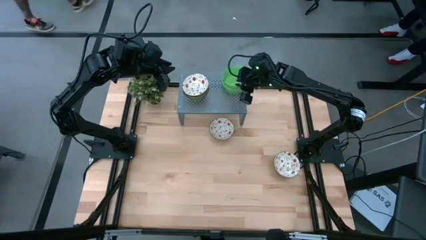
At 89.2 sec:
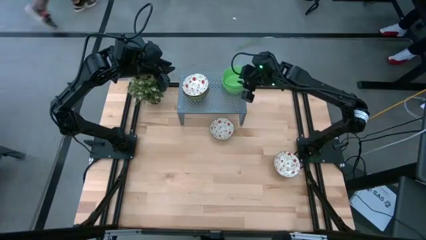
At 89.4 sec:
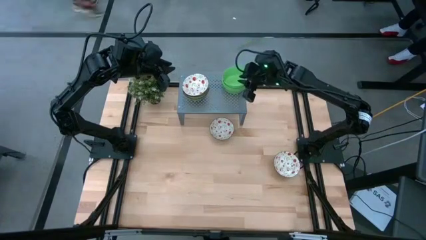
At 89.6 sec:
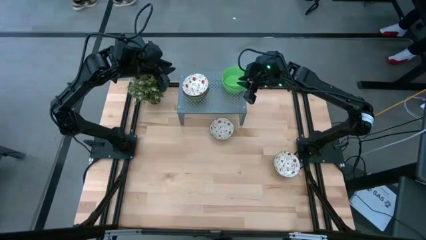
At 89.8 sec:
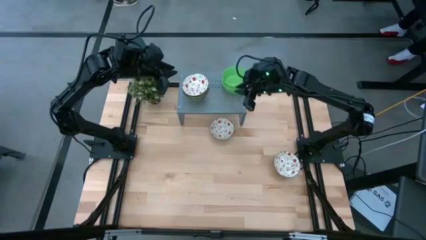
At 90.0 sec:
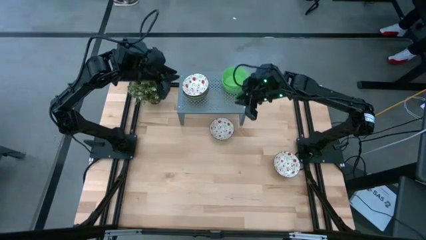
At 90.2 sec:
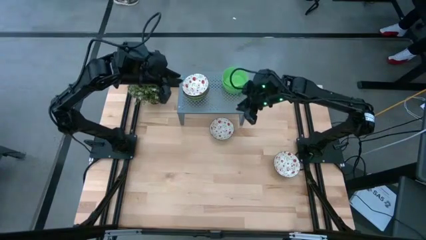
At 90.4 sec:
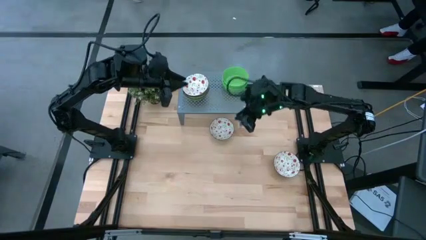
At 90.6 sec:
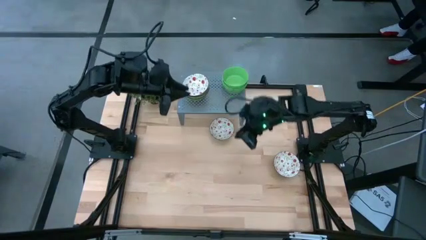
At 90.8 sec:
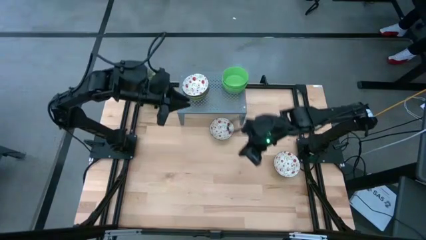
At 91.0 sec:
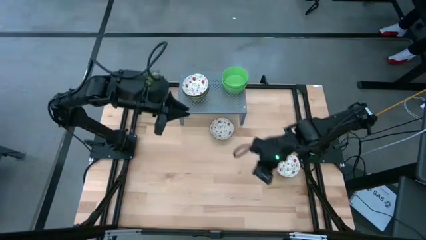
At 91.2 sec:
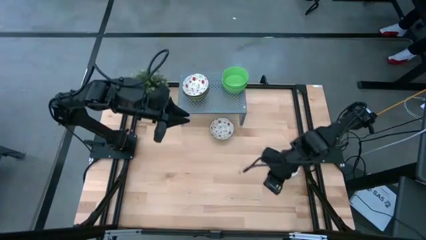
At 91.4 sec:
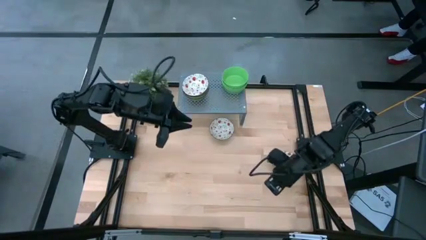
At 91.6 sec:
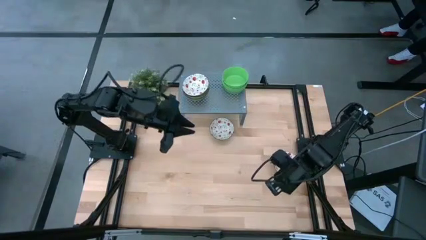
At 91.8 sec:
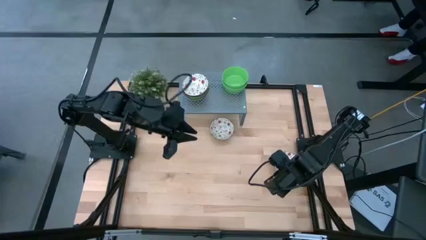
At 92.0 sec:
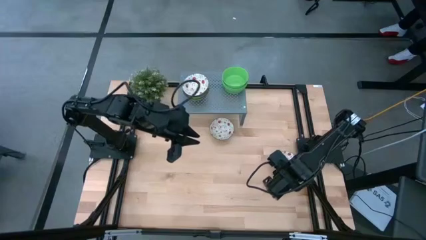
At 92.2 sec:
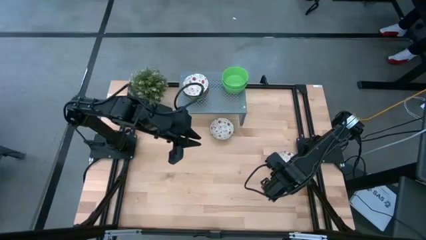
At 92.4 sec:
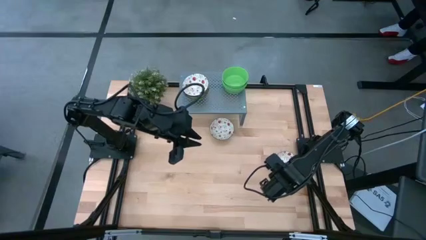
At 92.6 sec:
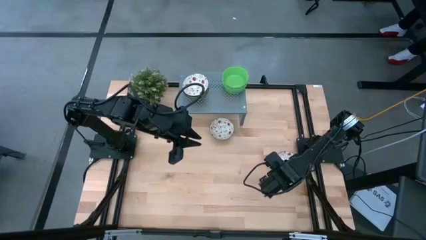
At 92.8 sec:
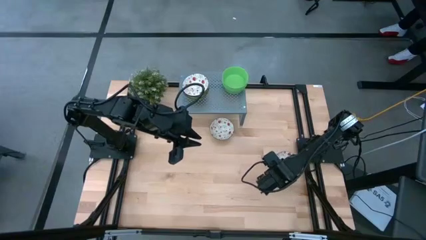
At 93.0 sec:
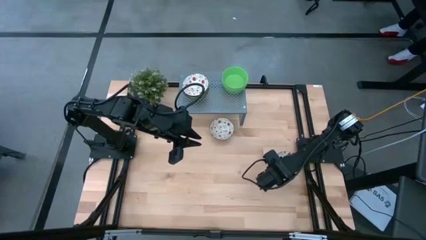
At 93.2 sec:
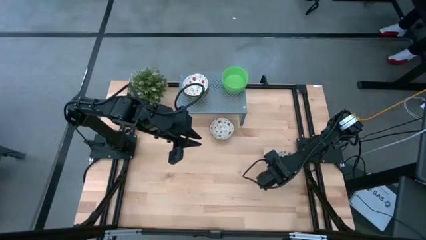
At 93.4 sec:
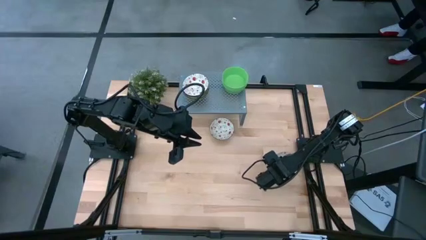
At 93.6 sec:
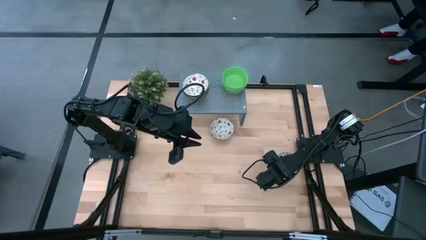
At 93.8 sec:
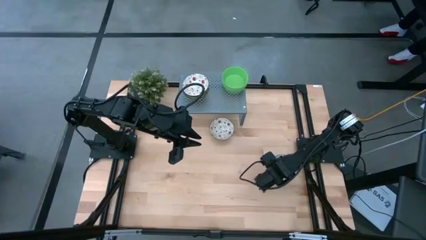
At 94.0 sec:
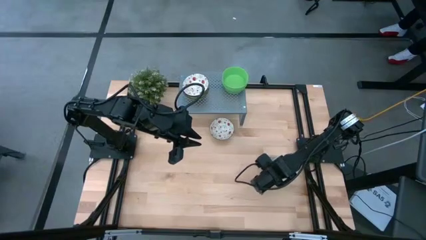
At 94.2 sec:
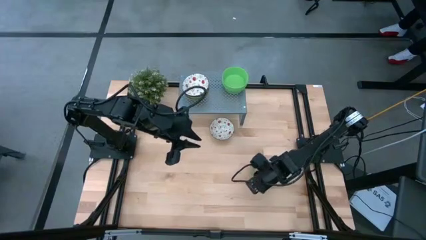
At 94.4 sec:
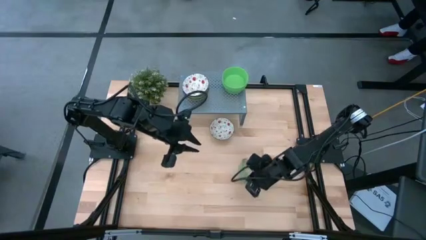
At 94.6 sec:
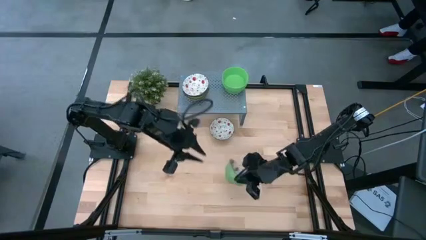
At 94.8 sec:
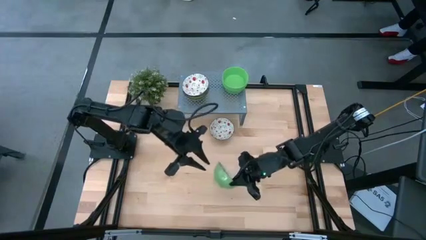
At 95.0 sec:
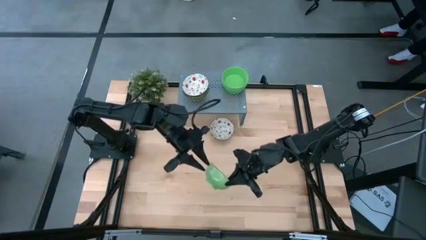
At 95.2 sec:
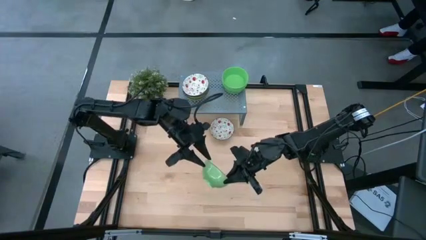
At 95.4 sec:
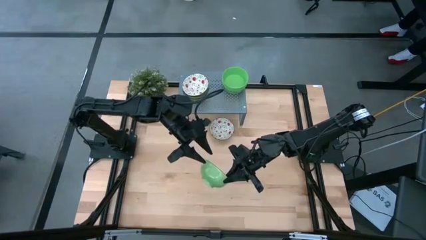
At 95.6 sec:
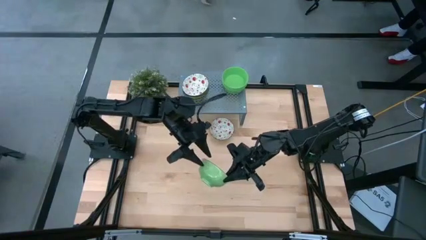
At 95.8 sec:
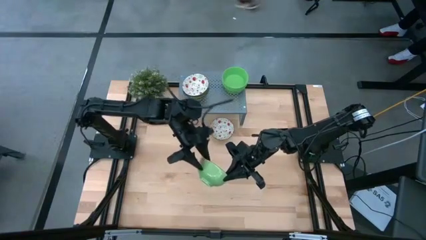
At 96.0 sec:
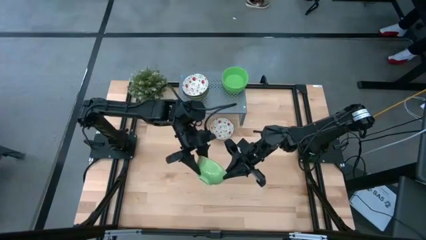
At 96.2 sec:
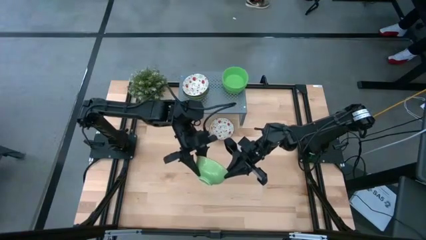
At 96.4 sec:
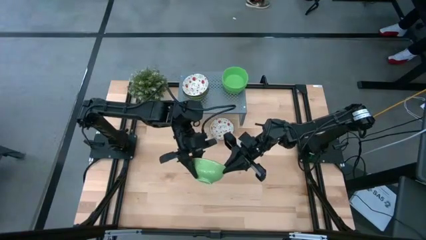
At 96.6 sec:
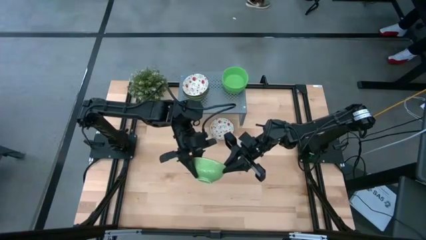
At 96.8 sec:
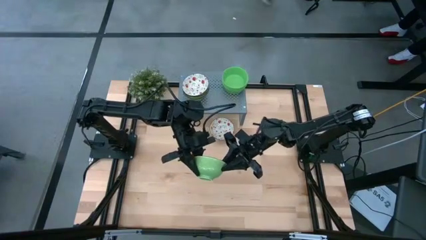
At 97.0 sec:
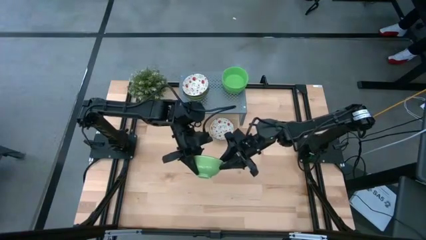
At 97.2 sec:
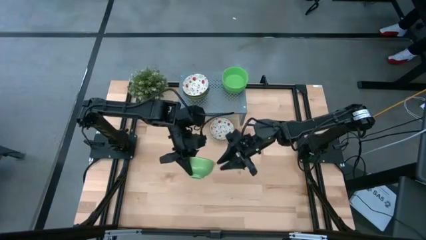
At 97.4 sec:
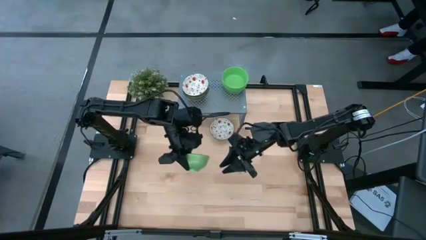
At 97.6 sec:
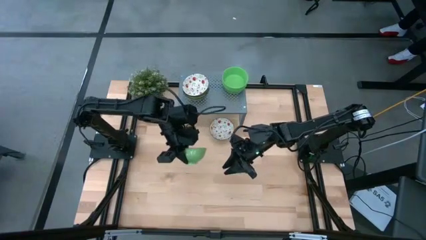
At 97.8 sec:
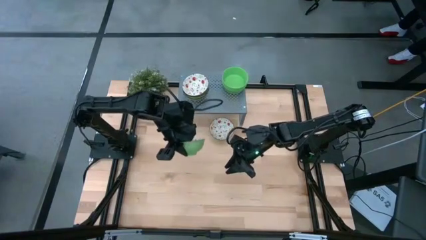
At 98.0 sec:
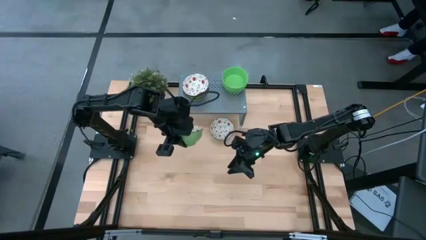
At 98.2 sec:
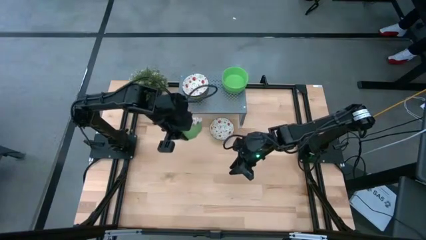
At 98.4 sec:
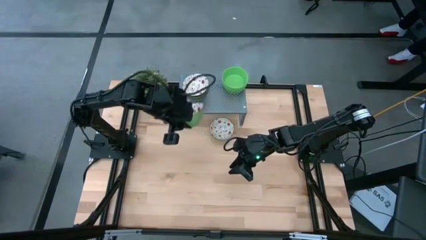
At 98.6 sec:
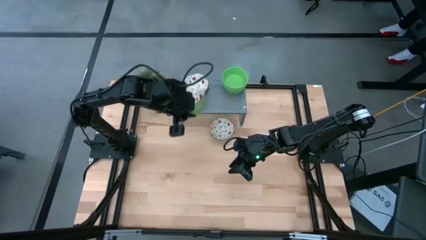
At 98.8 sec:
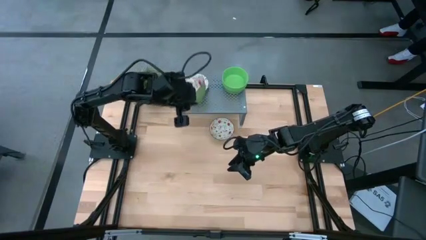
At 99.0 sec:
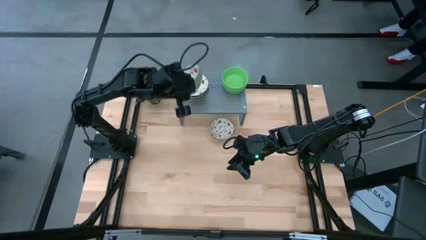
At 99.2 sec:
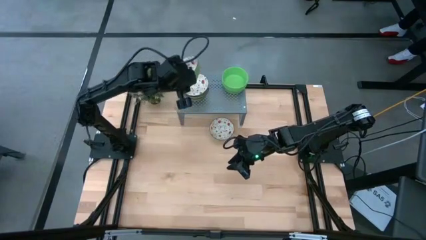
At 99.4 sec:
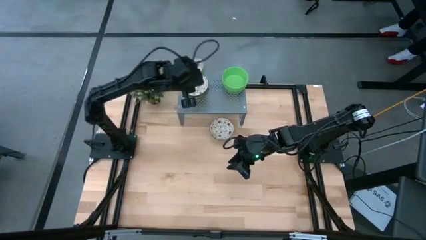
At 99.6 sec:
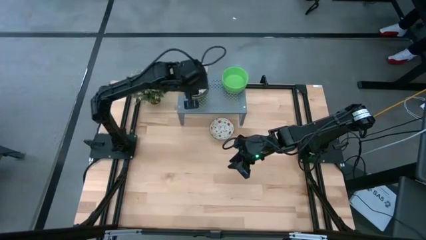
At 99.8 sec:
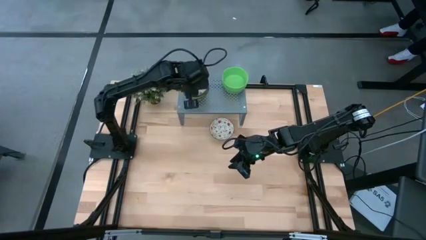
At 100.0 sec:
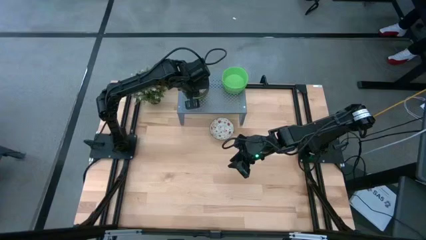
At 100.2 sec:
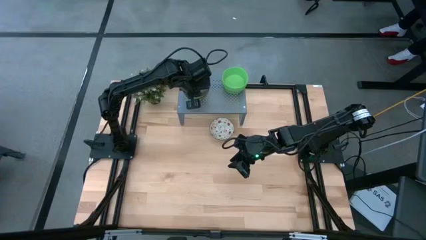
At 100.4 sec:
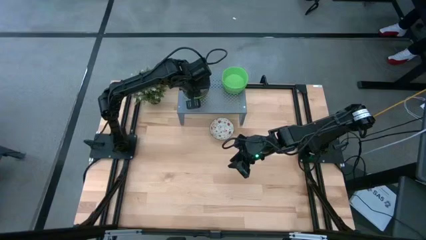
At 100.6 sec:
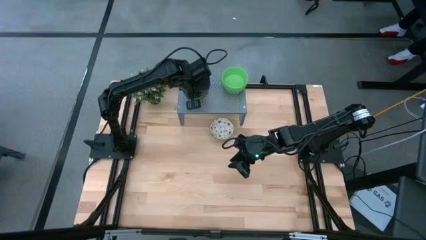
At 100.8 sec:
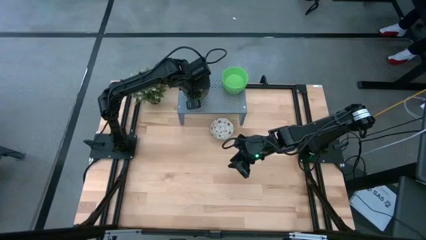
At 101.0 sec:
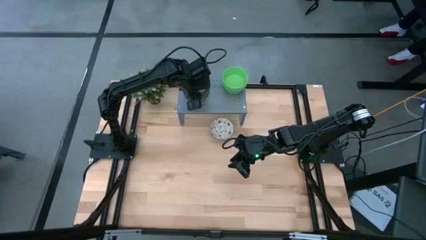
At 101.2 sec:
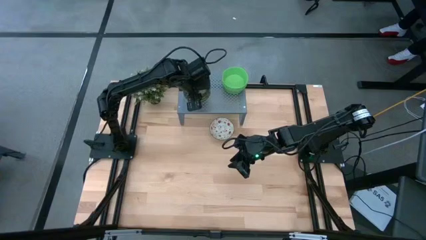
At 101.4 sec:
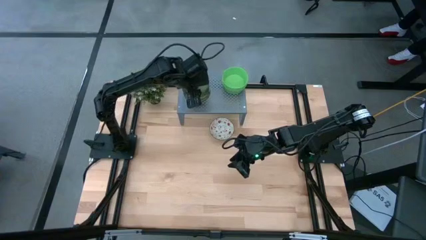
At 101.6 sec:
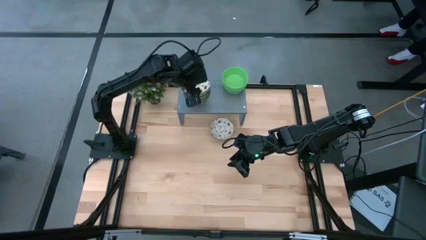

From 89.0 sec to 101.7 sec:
Task: Pick & Place Mini bowls
Stack the green patterned bowl on the green patterned bowl

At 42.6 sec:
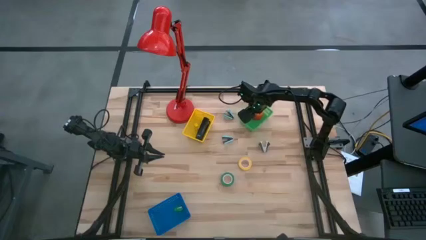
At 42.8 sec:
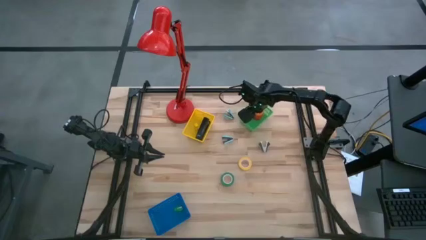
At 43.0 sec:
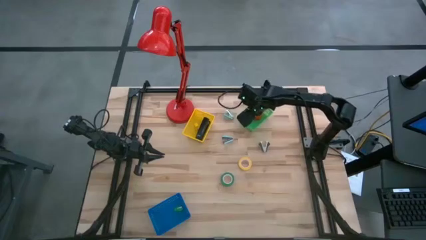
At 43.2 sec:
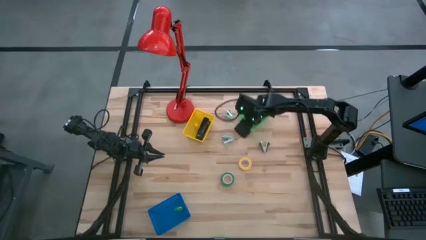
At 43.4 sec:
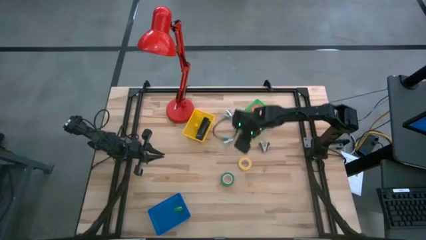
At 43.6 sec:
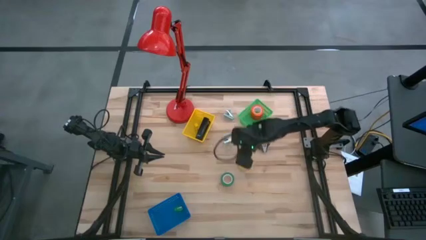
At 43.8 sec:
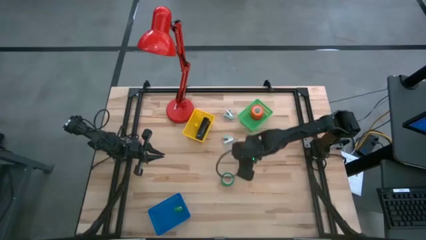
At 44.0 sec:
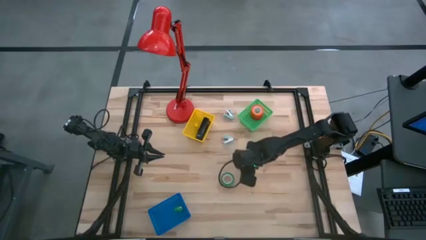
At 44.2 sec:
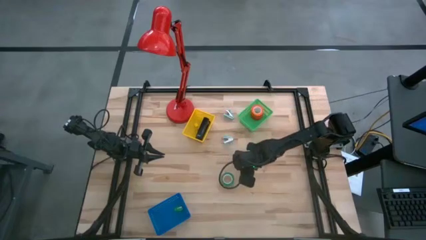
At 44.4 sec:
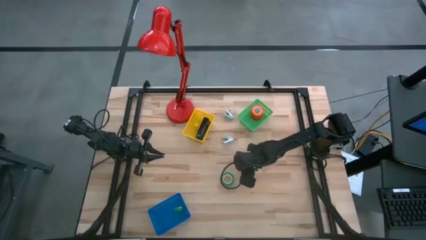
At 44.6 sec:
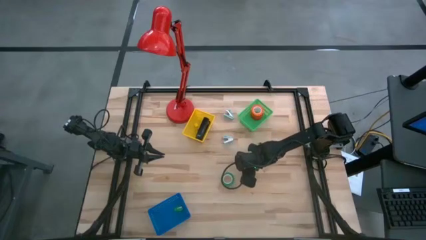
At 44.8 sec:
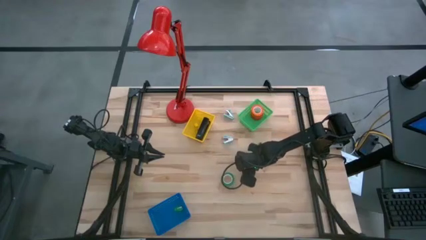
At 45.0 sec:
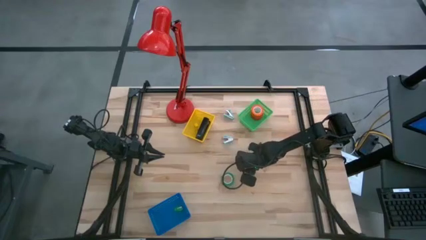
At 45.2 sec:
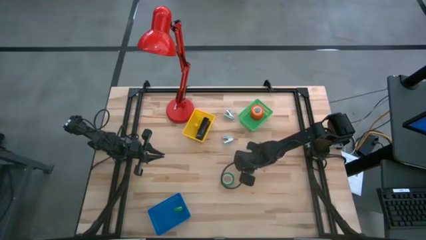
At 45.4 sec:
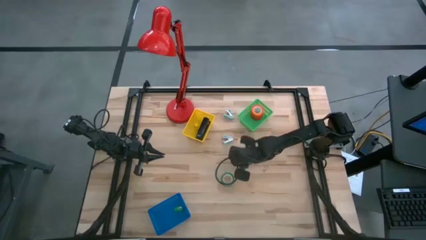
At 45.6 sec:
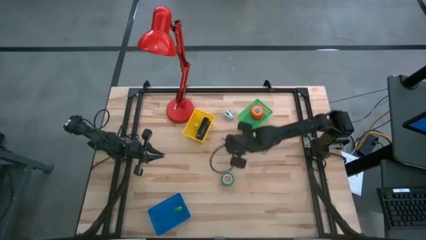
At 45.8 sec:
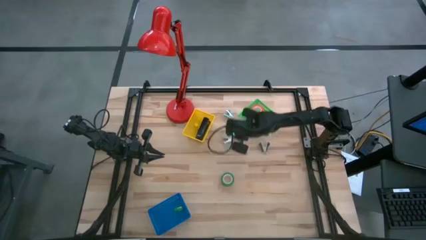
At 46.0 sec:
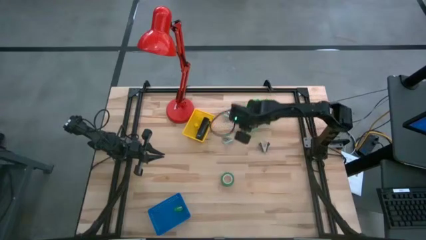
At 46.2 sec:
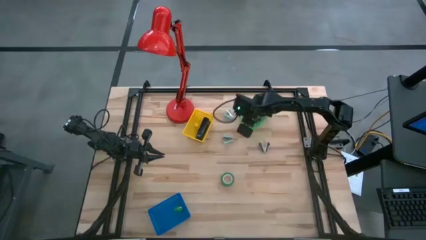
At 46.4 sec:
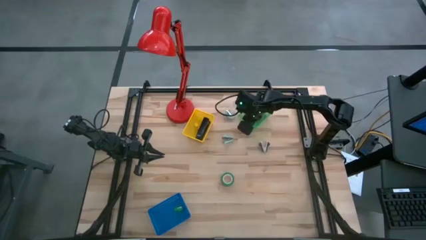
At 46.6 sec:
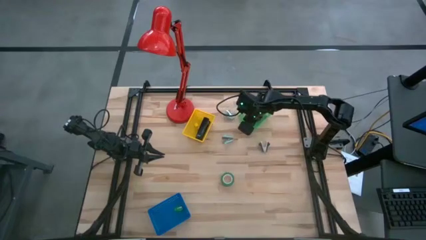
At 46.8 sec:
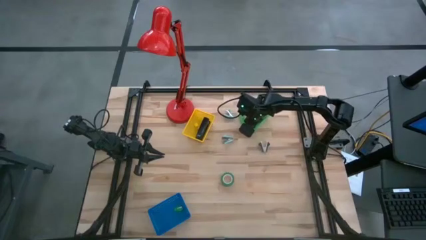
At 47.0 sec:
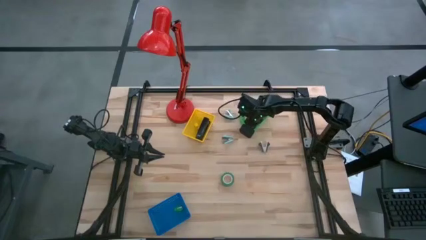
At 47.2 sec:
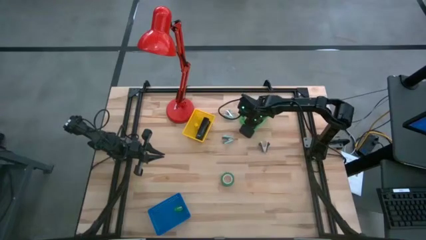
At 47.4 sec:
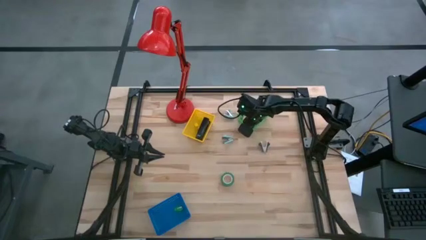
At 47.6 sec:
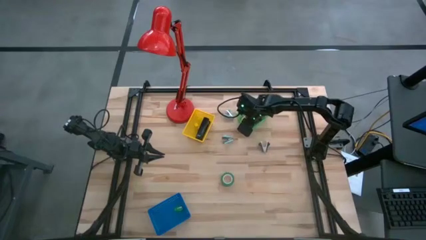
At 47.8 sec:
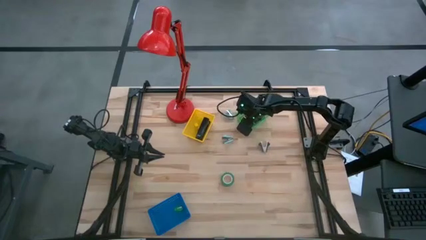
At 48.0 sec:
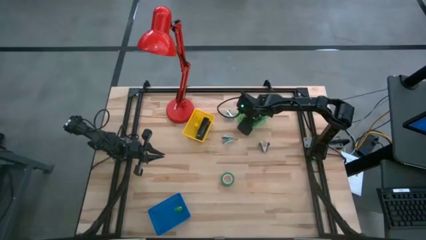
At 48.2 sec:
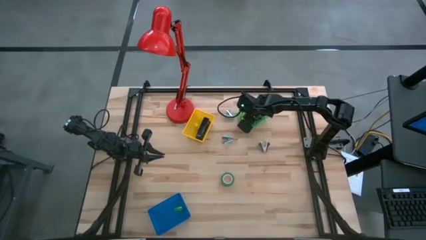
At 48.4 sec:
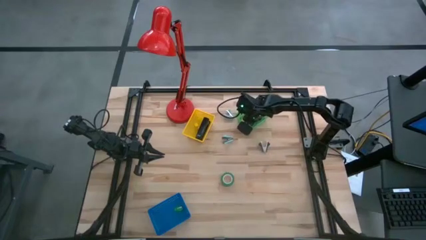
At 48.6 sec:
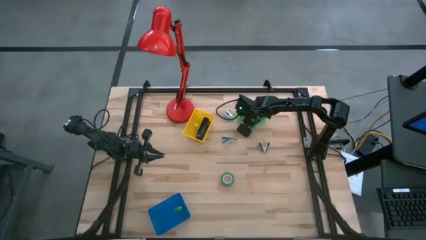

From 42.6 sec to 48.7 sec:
Task: Pick and place Stapler, Stapler remover, tape
Put the yellow tape into the green bin
